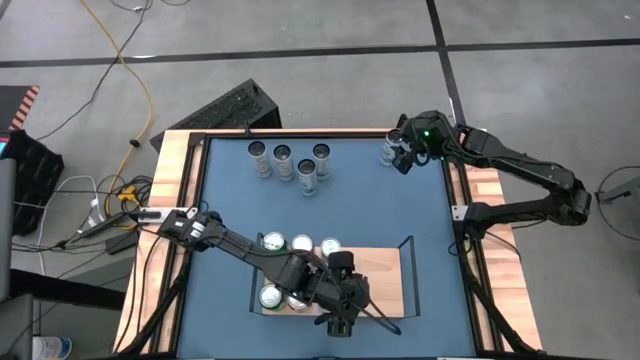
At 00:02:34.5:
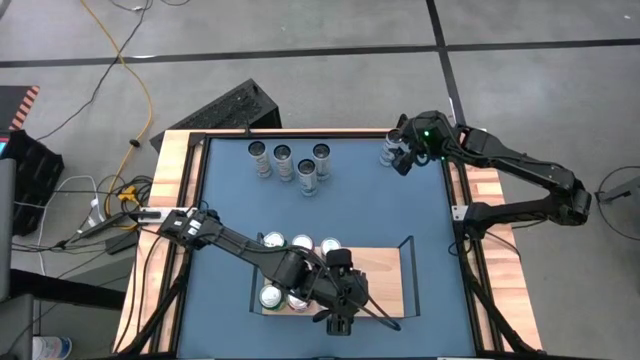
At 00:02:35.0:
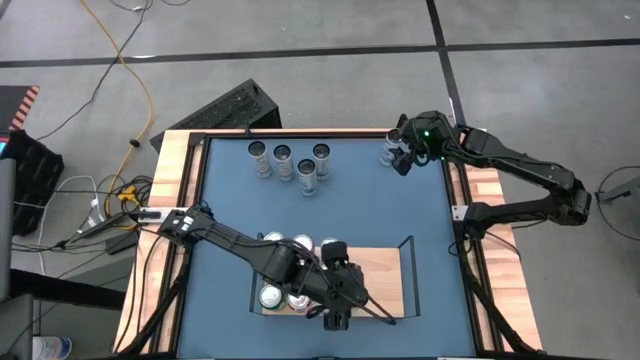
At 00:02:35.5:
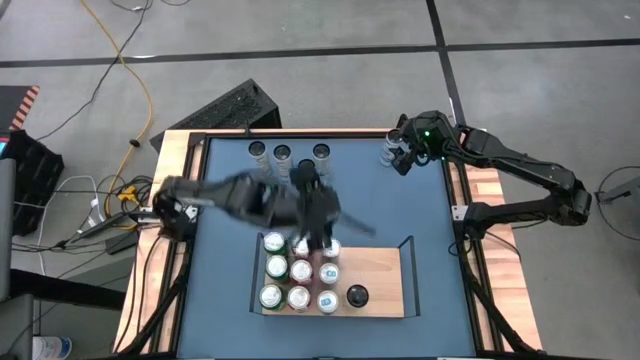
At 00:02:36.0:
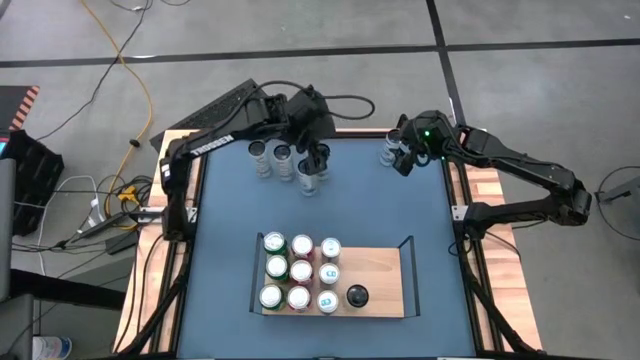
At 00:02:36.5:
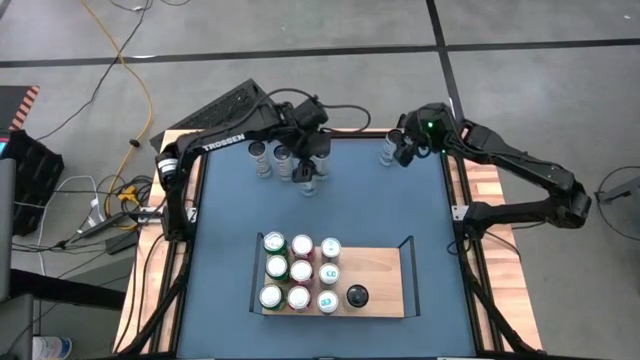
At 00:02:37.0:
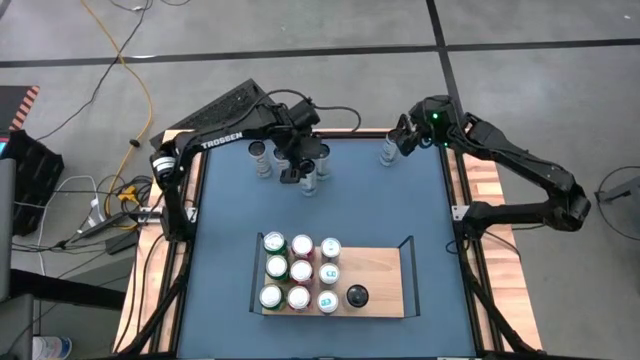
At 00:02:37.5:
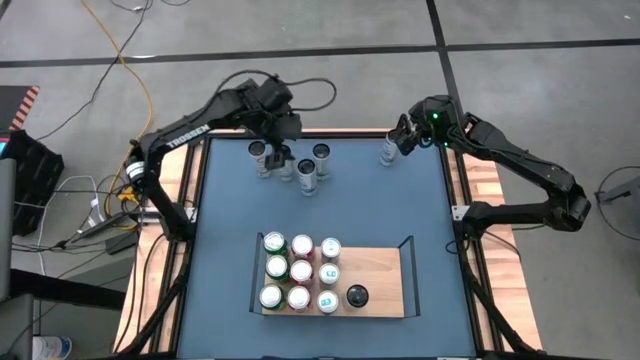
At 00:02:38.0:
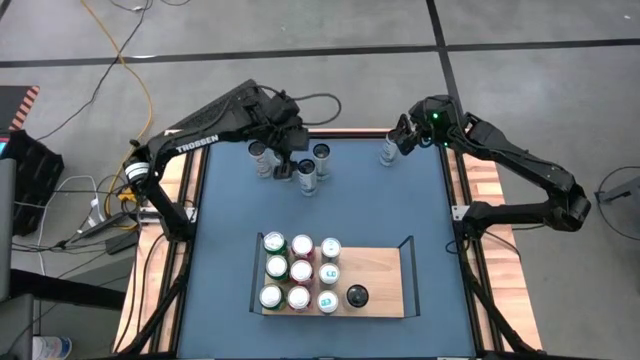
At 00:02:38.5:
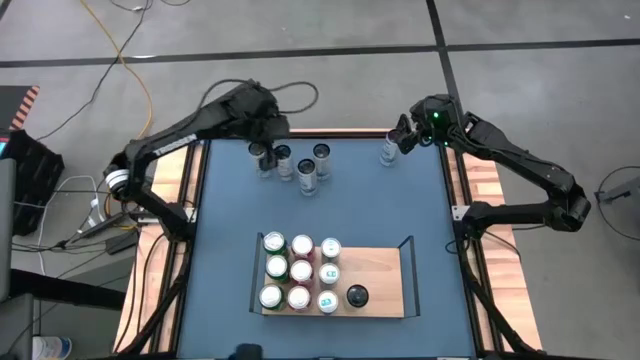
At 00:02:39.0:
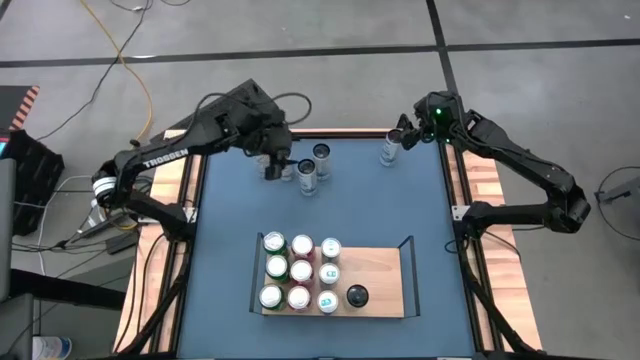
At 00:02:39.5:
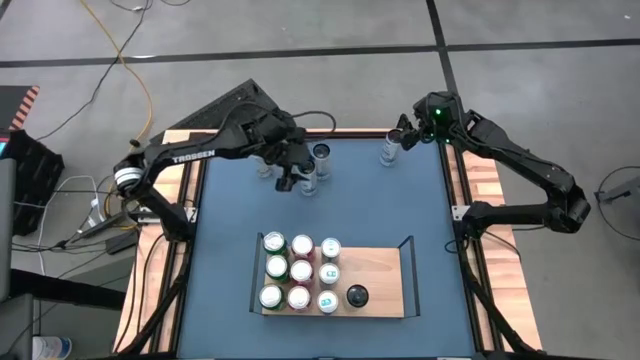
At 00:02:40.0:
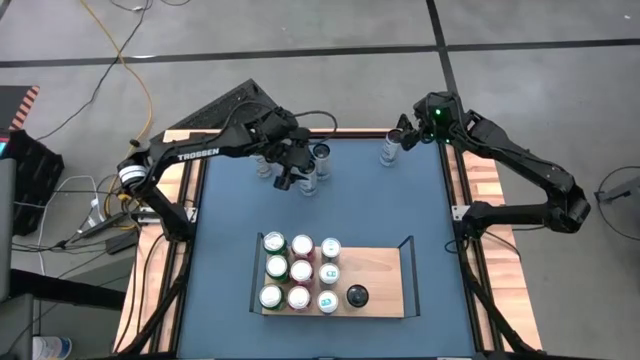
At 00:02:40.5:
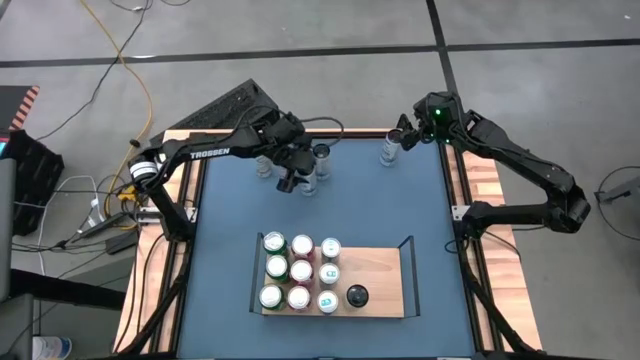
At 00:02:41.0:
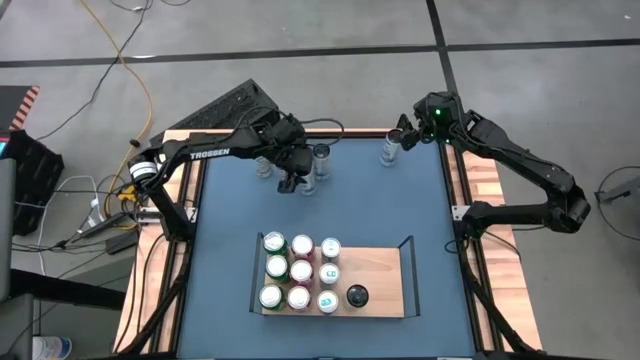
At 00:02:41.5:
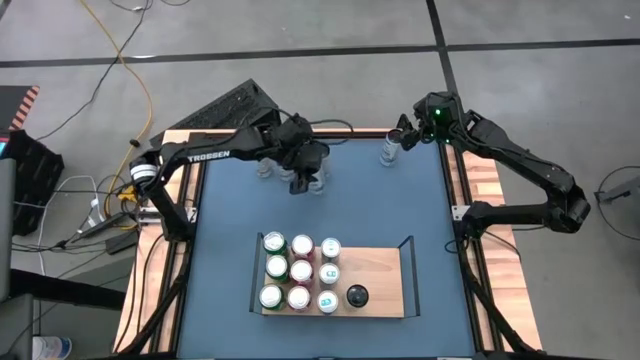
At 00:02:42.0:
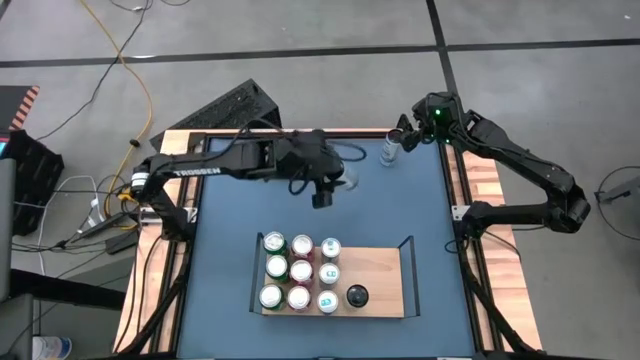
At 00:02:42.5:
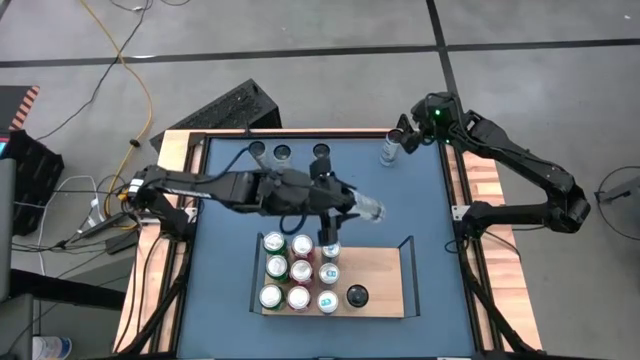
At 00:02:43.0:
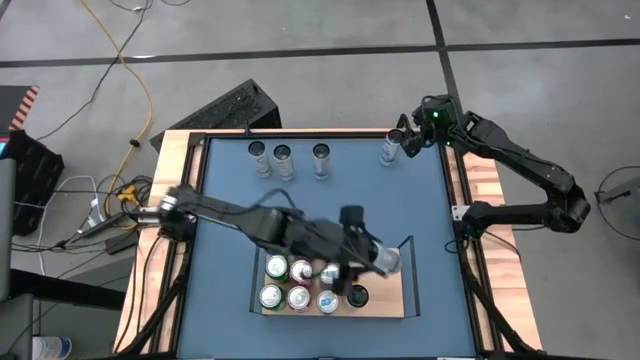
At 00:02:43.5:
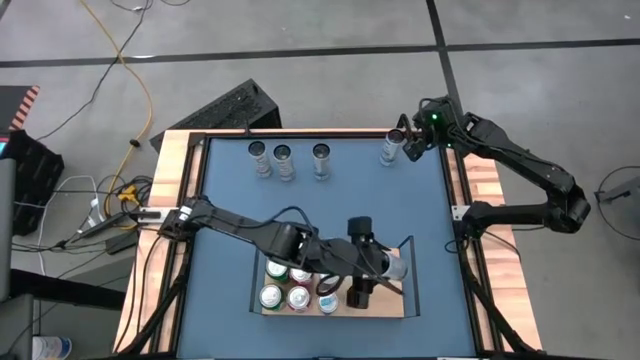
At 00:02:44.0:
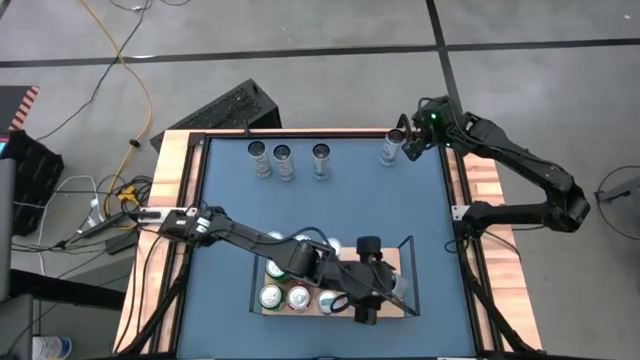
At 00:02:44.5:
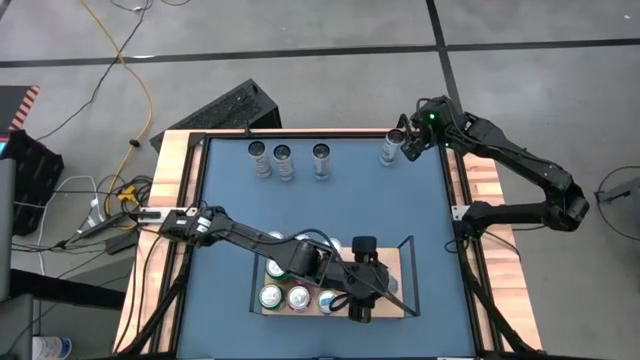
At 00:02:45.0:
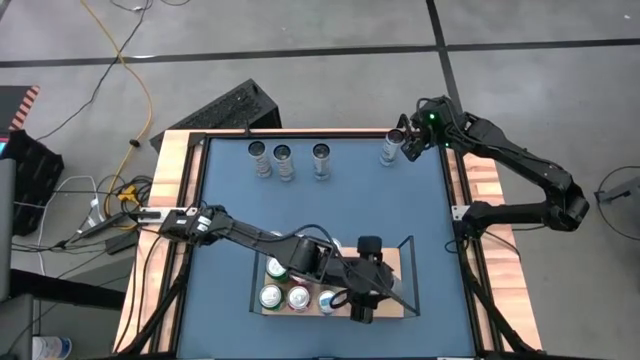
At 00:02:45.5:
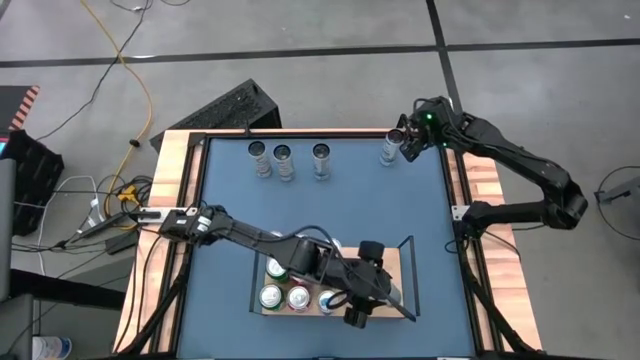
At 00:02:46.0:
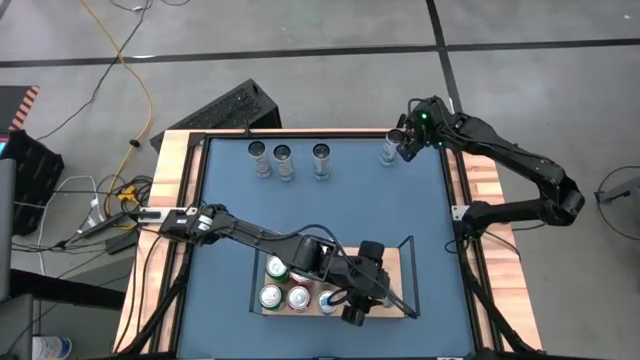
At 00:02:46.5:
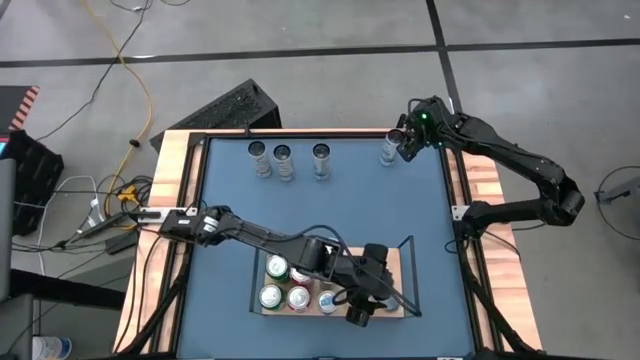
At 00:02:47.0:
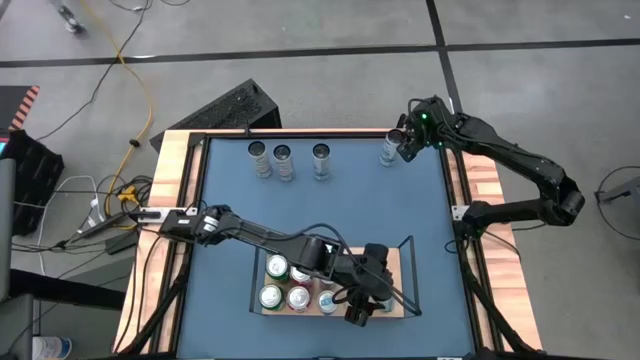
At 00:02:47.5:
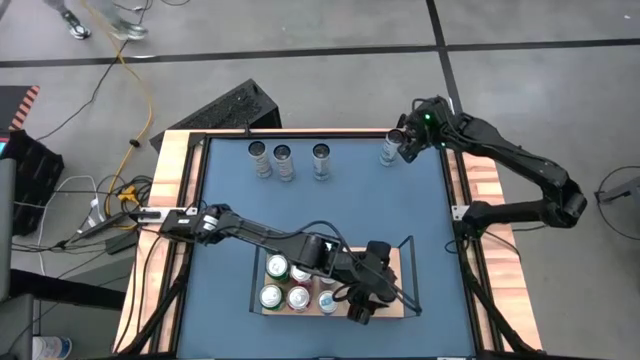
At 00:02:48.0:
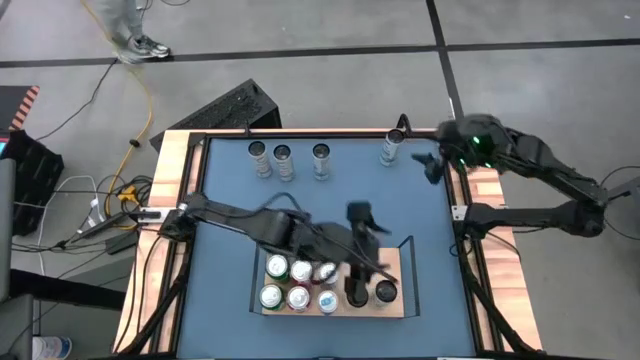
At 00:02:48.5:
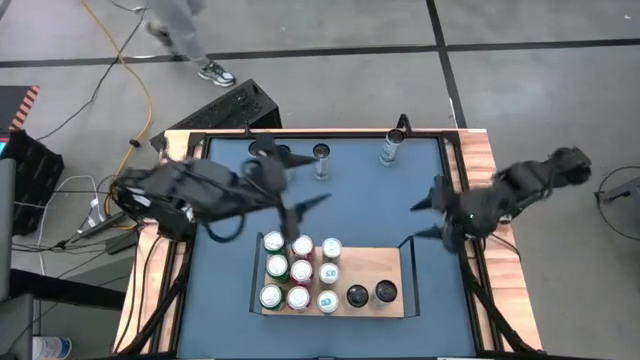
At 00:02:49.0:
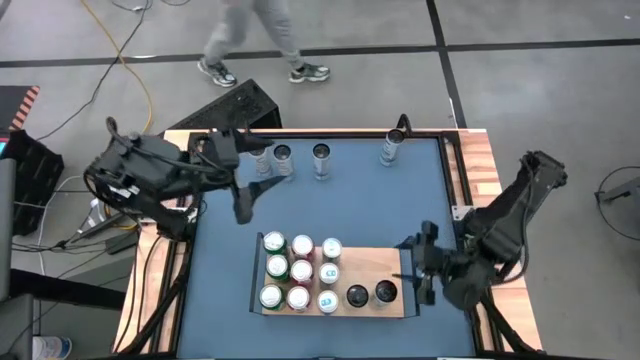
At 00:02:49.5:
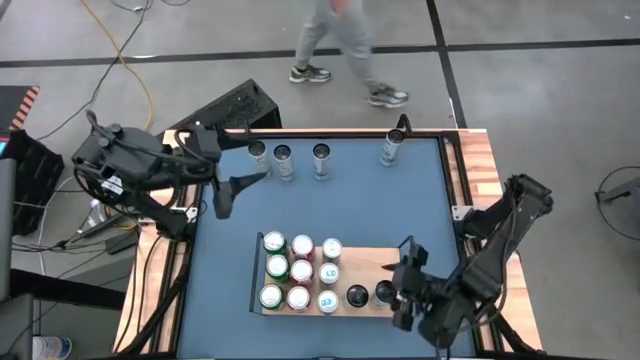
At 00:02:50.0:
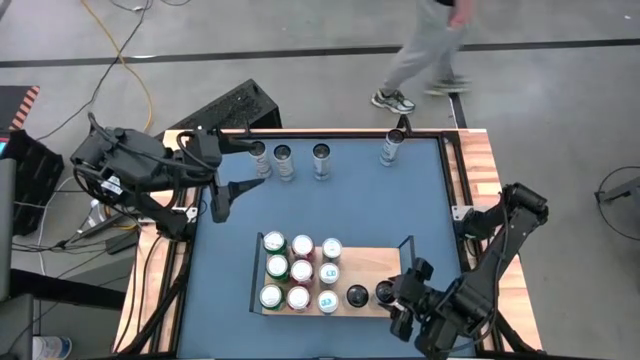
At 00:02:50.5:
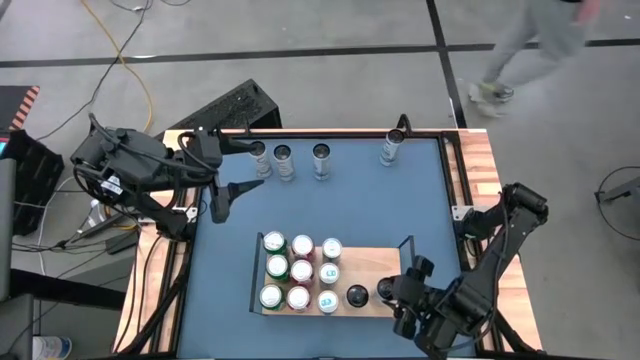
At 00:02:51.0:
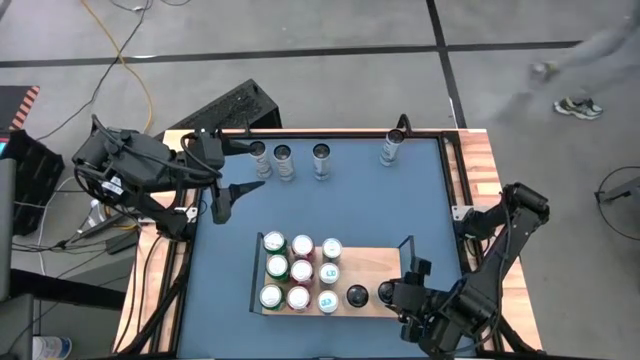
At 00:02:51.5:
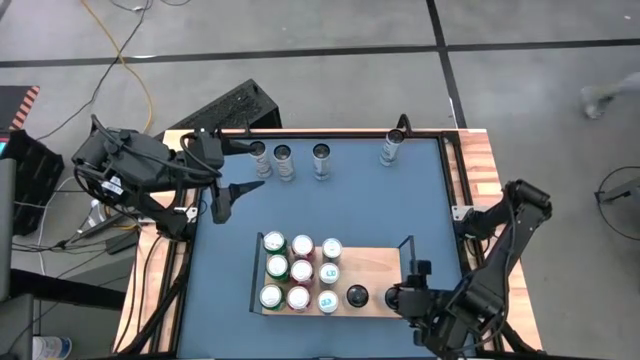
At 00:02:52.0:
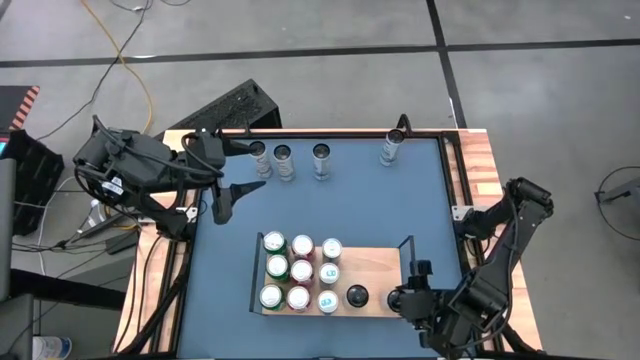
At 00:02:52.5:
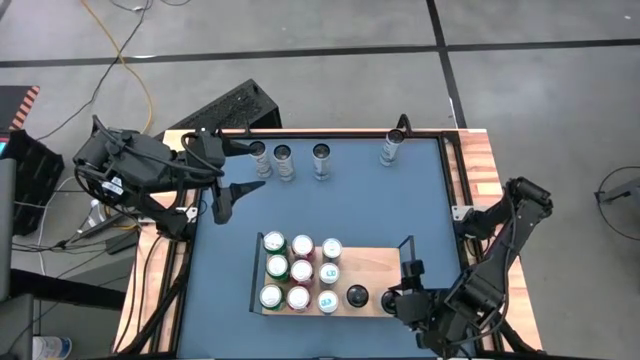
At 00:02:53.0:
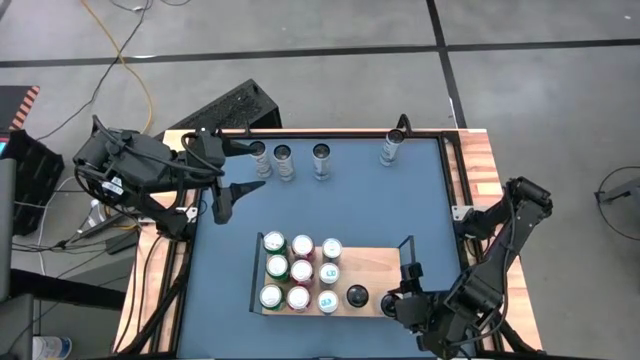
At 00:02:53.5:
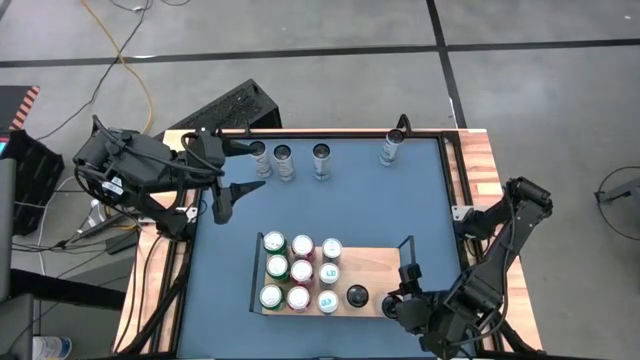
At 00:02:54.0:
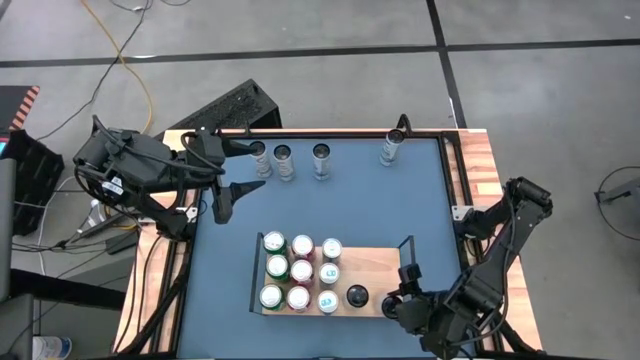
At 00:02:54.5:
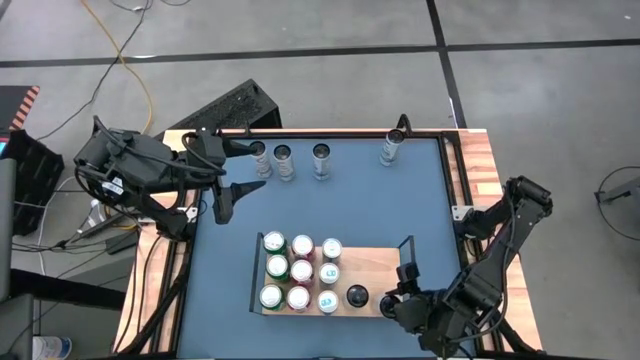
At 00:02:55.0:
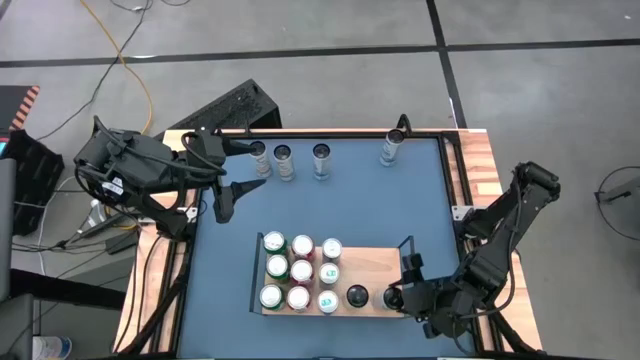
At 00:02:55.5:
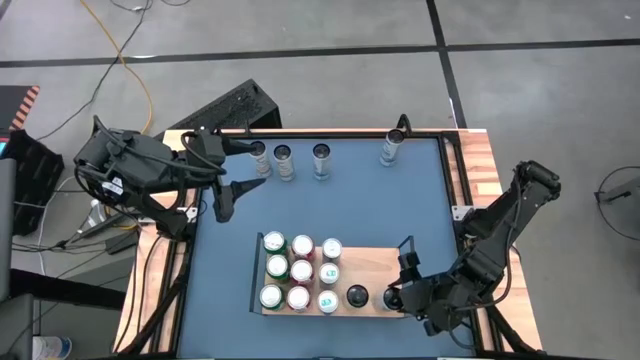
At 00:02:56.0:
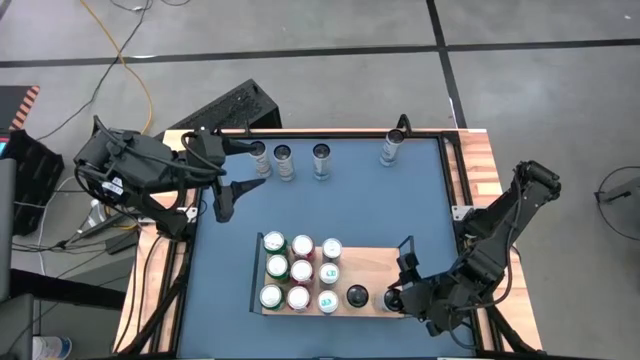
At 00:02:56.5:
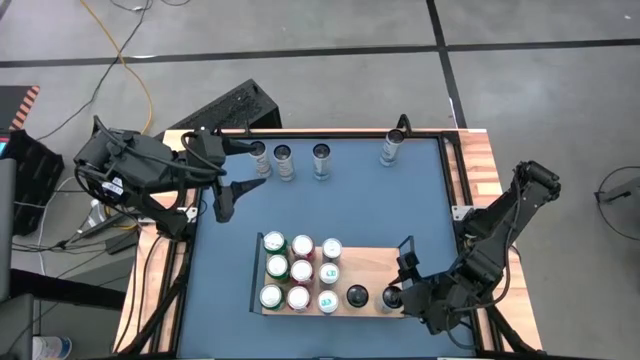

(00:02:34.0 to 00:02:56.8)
Task: Place canned beverage on shelf
Put the bottom left white-blue soda can on the shelf
